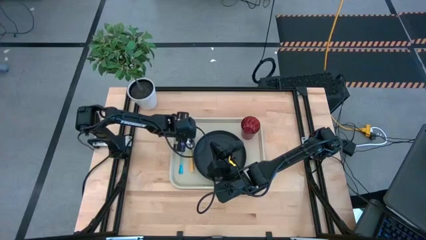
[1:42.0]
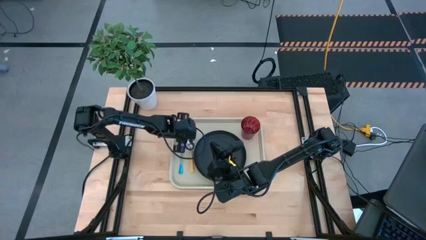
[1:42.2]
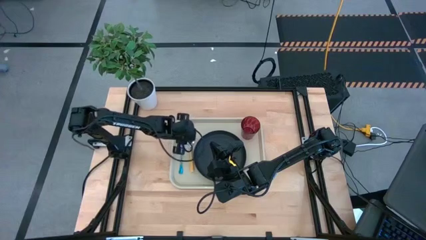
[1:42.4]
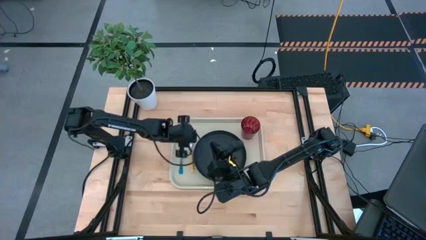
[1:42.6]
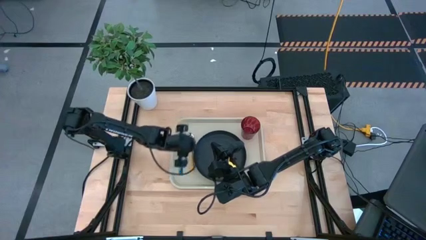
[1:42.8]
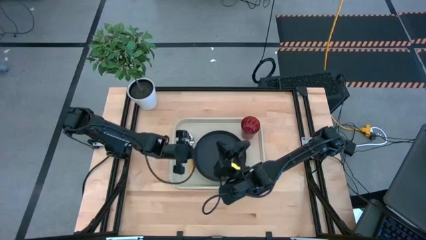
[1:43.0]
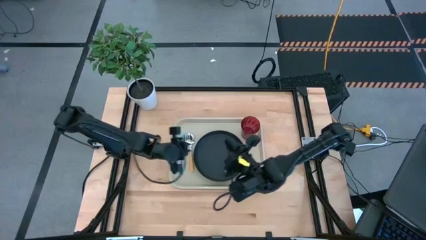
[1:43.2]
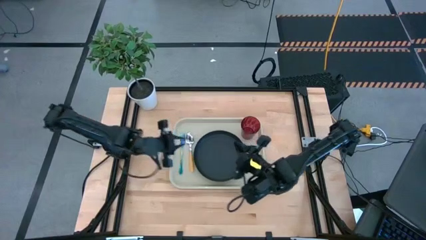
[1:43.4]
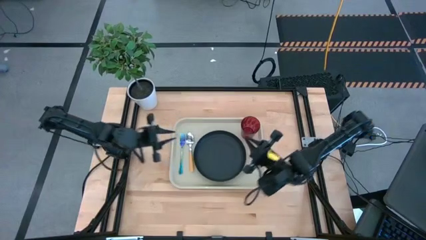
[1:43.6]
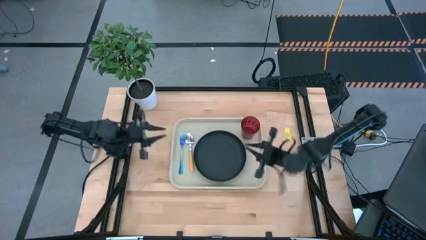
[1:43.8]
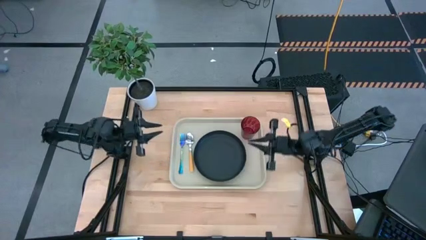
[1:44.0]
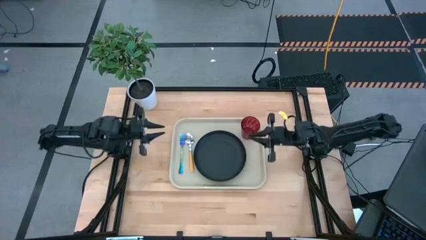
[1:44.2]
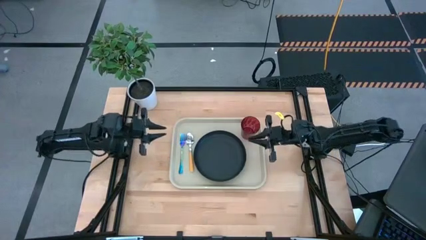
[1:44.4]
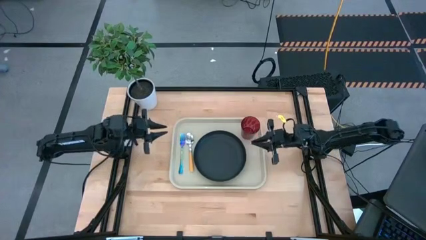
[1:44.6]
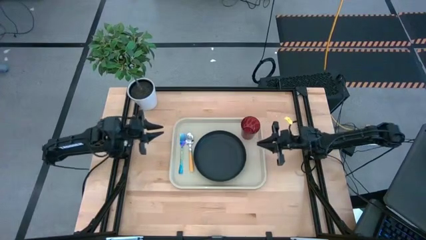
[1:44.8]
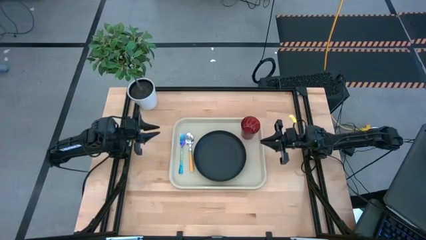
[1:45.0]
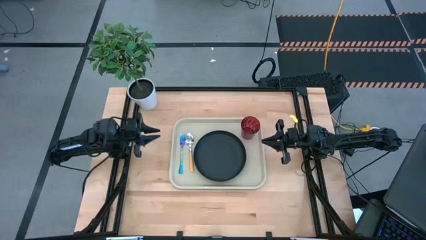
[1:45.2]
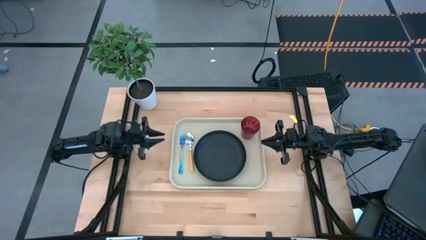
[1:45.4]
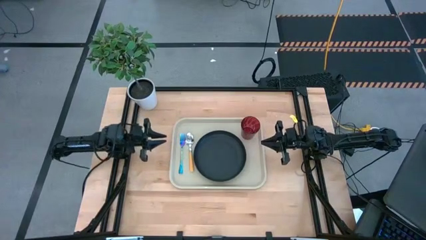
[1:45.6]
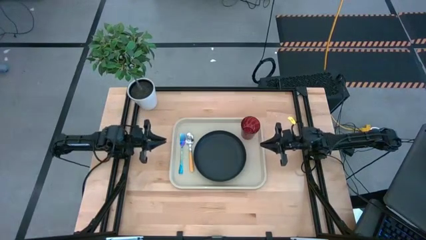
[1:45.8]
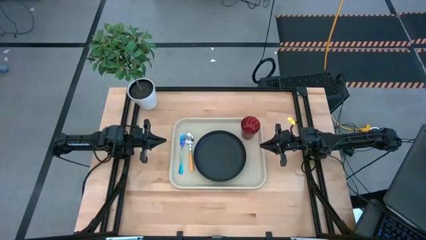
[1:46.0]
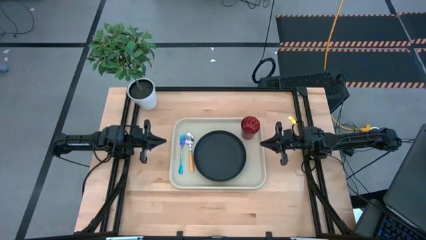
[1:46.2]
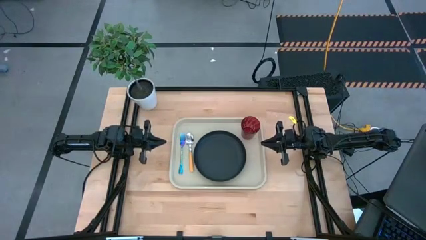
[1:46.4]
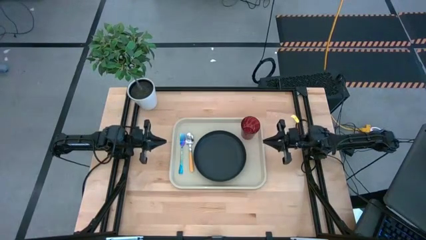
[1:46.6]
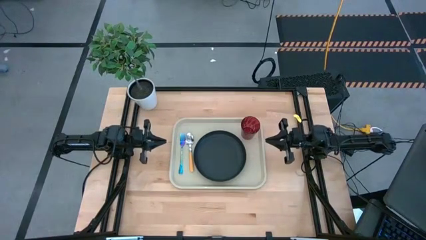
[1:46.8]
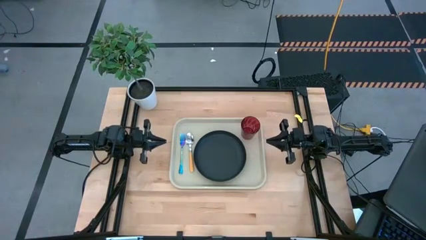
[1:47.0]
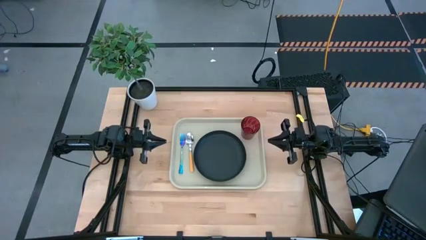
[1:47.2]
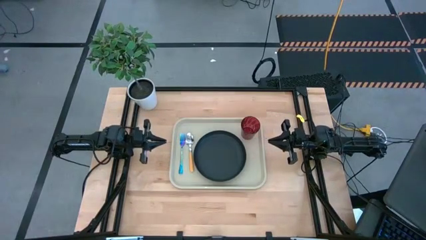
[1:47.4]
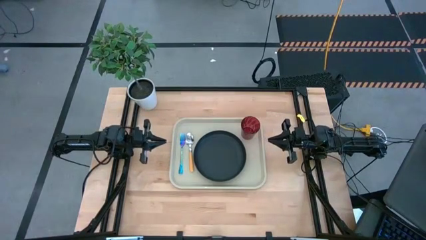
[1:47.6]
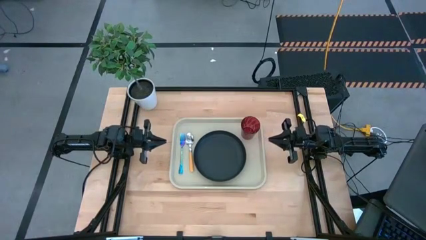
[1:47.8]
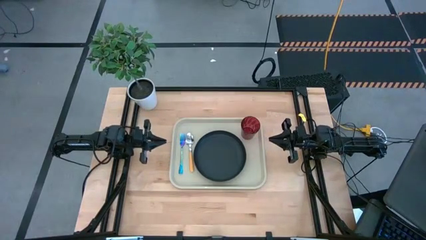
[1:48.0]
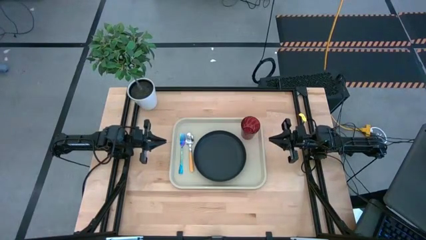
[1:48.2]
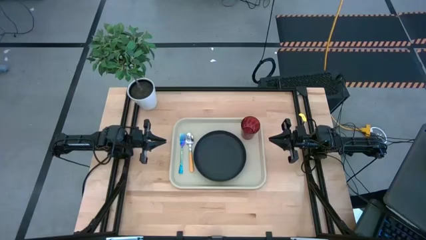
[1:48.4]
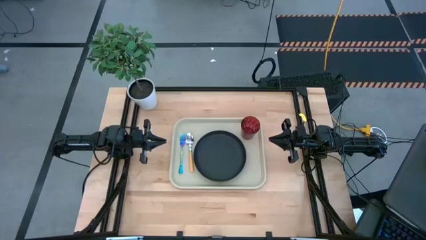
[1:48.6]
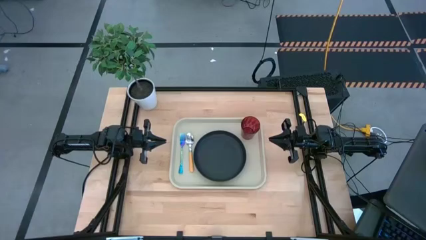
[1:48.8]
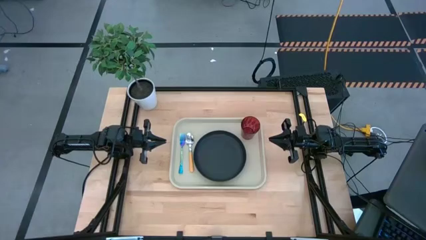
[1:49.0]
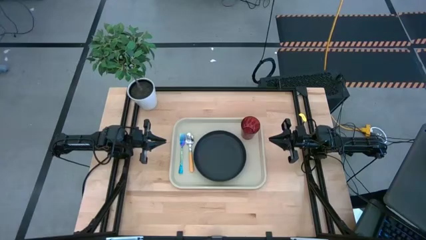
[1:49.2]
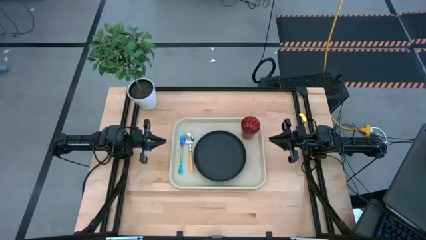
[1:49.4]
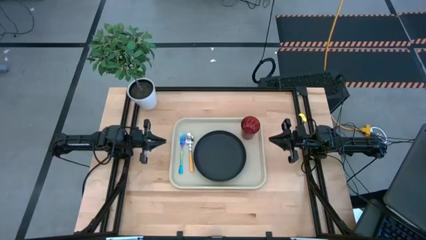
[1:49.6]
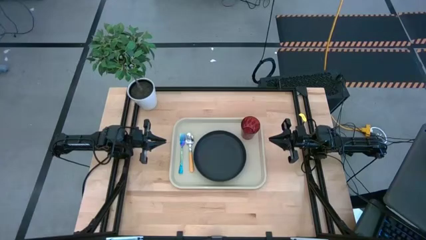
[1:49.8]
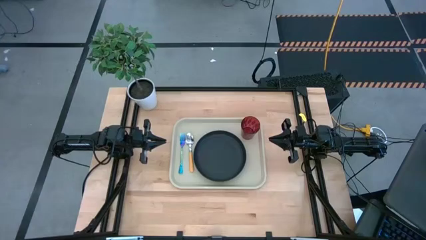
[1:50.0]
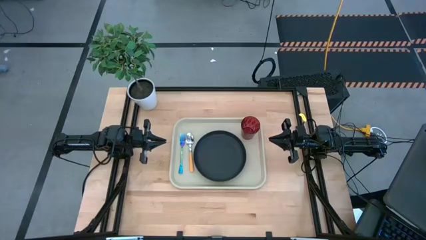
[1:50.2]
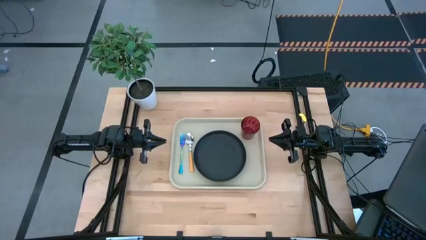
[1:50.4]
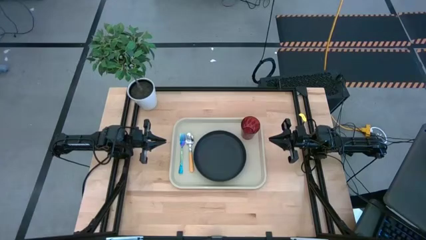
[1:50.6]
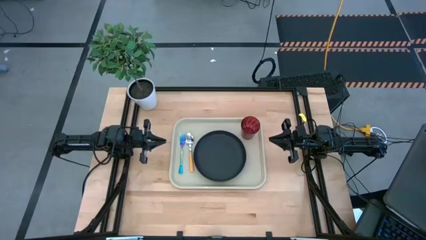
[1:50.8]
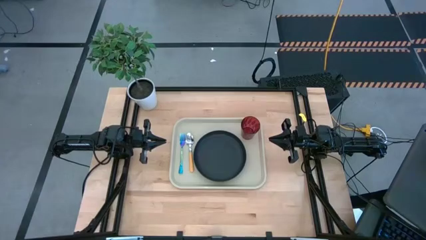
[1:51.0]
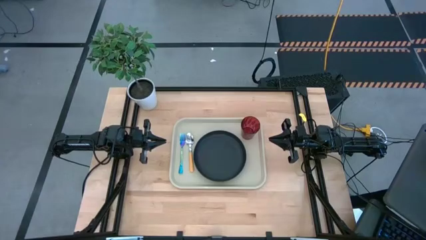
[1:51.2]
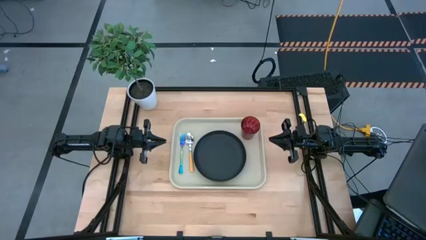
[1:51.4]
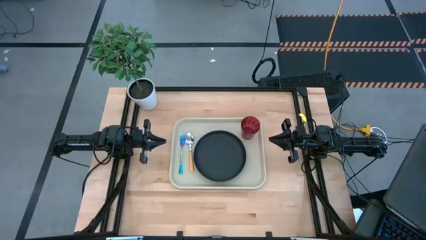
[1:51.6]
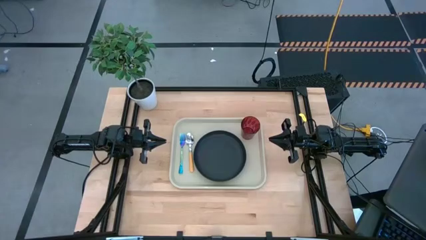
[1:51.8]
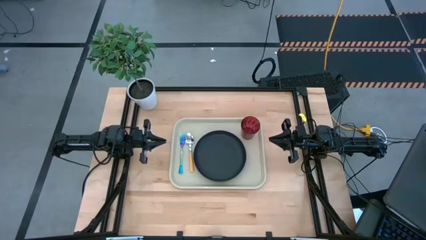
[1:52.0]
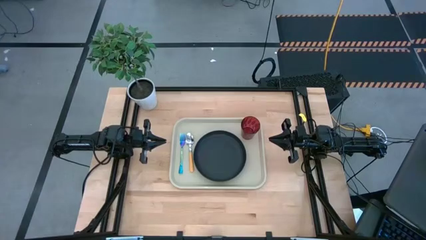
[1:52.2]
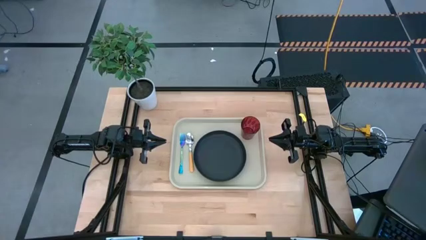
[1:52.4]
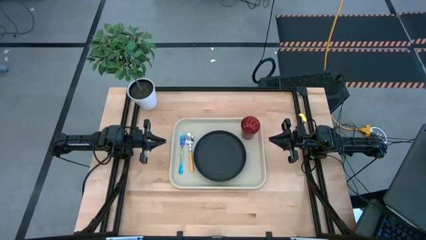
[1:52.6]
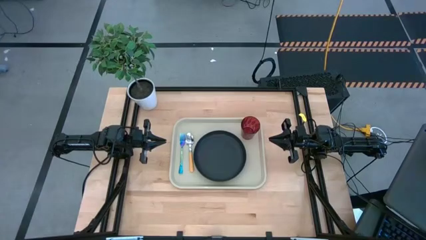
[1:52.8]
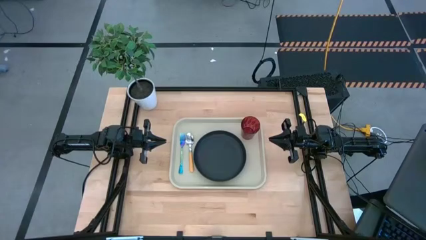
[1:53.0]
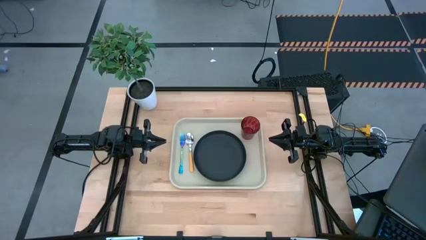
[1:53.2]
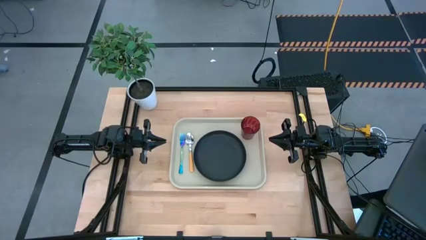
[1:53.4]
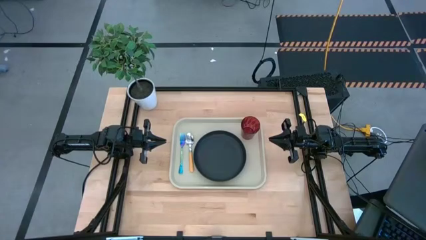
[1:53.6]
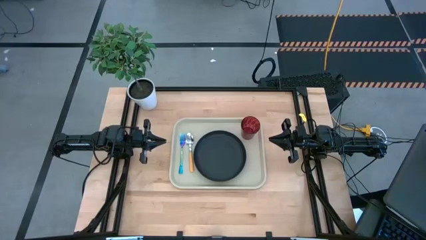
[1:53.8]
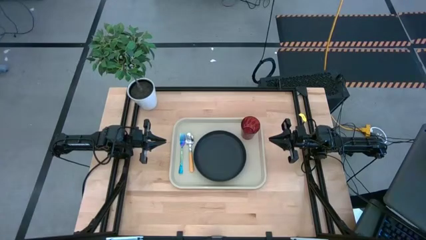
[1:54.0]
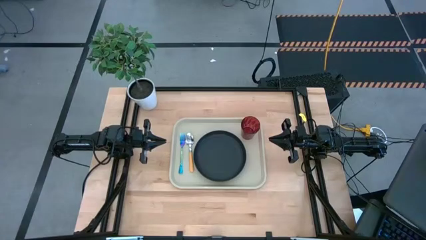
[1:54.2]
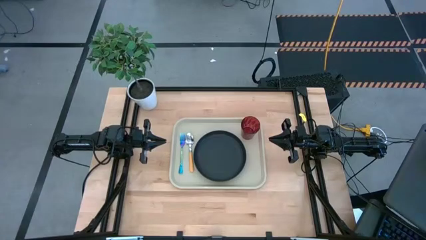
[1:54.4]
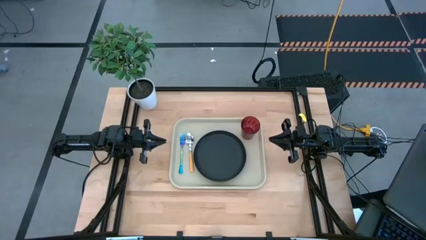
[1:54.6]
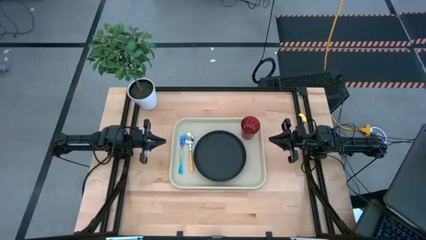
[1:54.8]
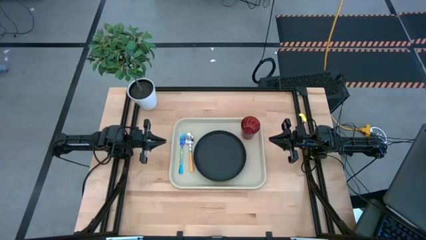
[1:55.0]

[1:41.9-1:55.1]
Task: Pick and place plate/cup/fork/spoon on tray
Return to Home Position

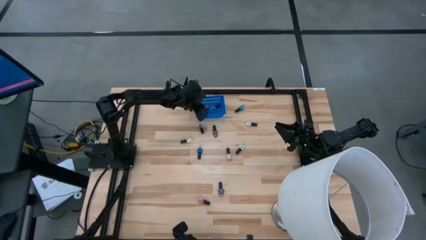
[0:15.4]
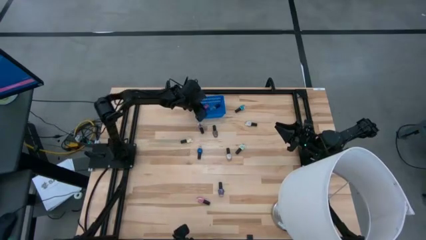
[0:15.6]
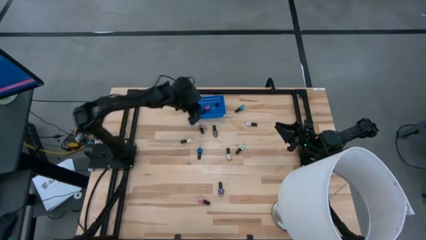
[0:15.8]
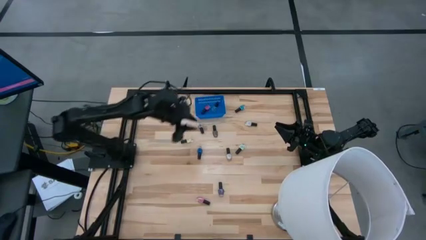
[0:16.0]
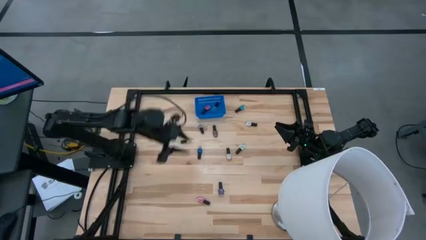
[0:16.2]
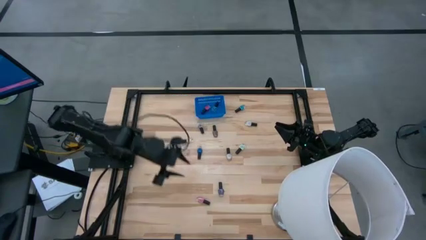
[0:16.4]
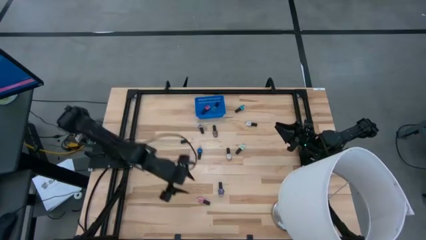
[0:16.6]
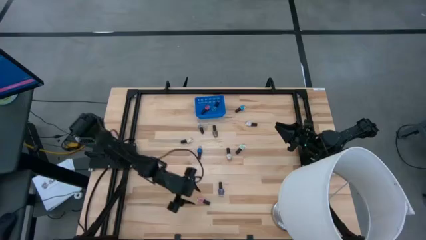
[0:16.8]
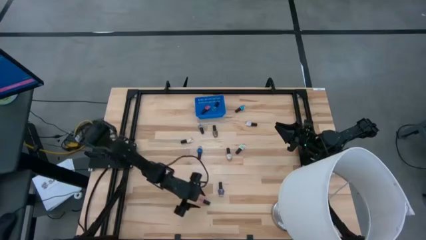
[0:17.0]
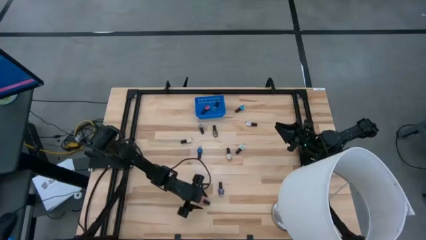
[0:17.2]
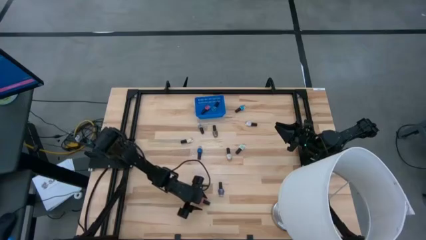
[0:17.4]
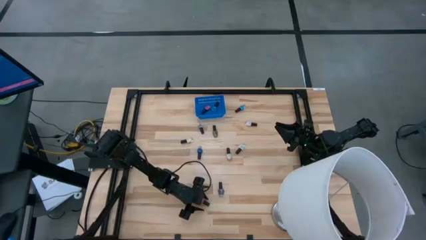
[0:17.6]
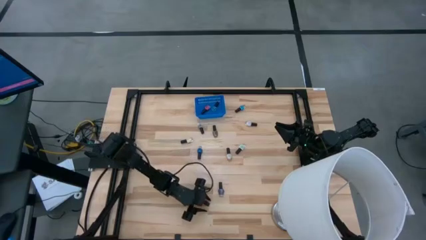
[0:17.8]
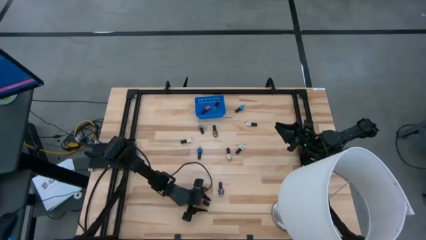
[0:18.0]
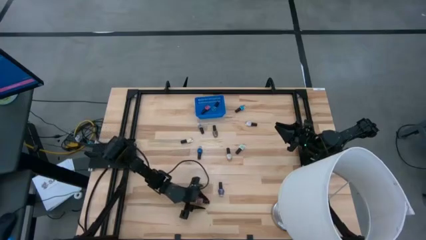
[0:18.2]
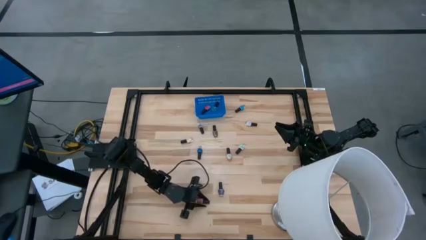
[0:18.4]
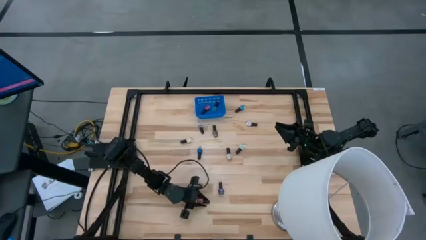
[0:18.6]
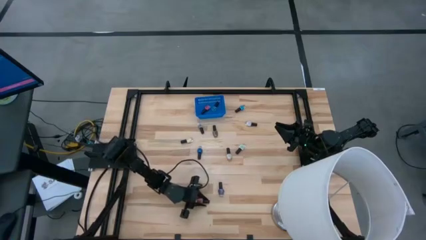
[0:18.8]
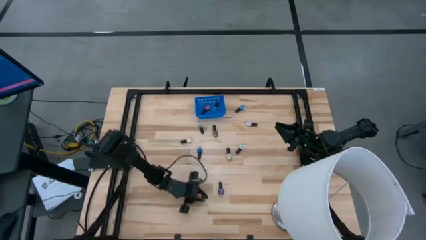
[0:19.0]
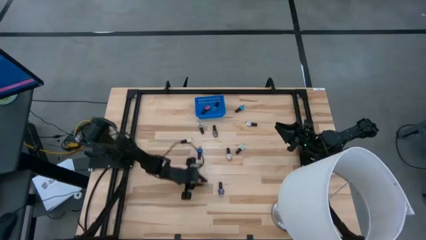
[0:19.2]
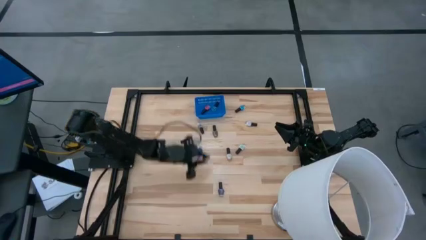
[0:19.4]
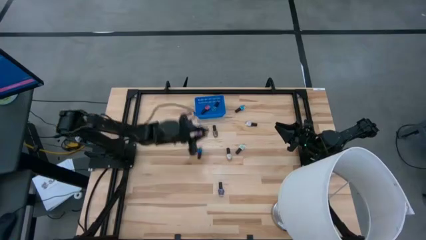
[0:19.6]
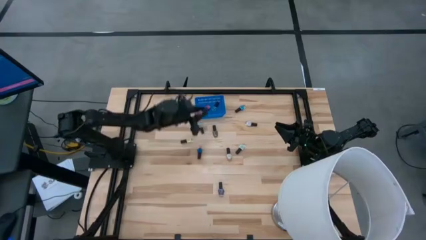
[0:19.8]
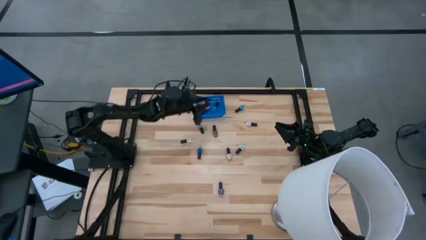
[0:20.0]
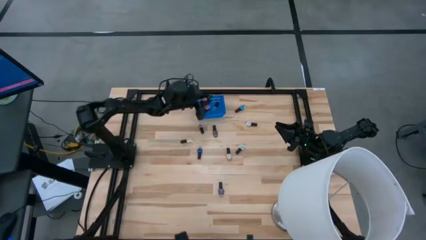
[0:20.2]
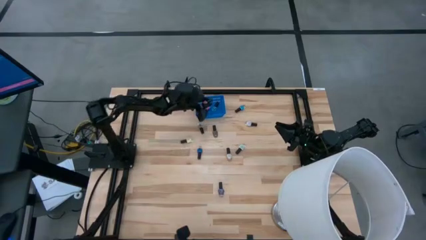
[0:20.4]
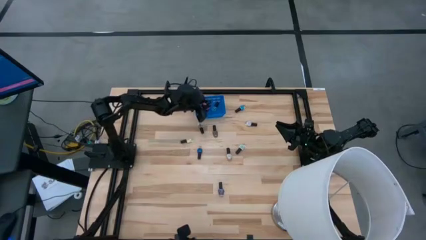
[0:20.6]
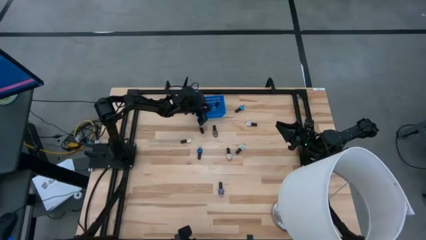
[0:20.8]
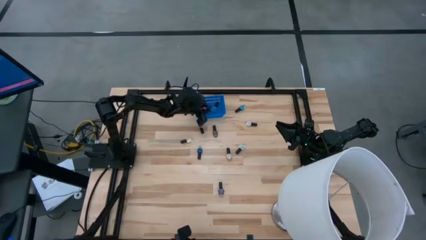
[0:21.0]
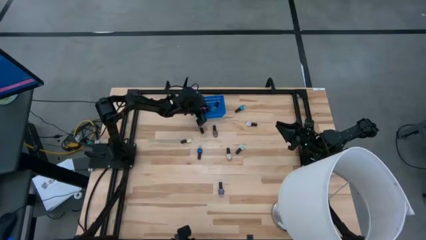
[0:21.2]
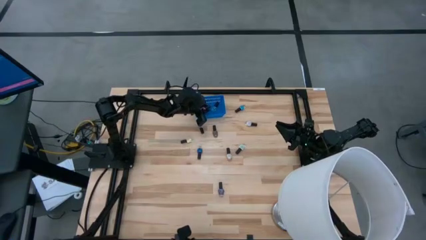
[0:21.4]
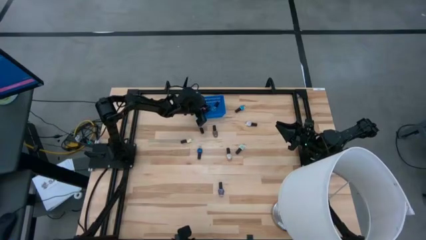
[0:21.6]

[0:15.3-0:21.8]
Task: Pick & Place Nail Polish
Put the light pink nail polish bottle into the blue basket
